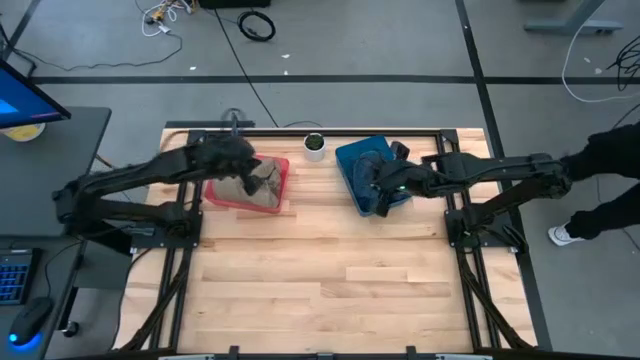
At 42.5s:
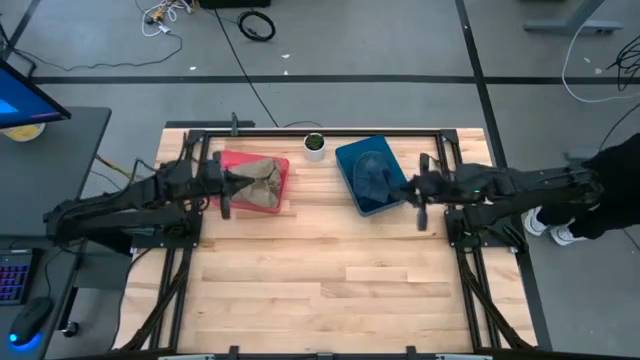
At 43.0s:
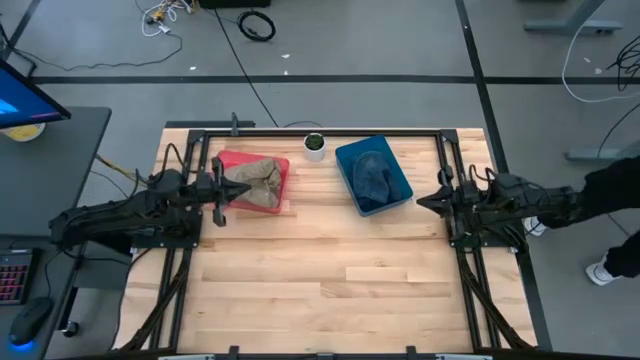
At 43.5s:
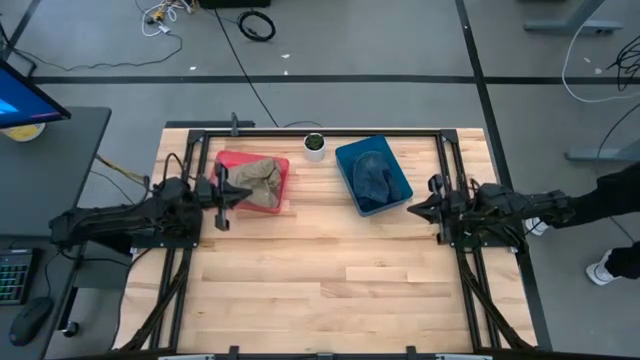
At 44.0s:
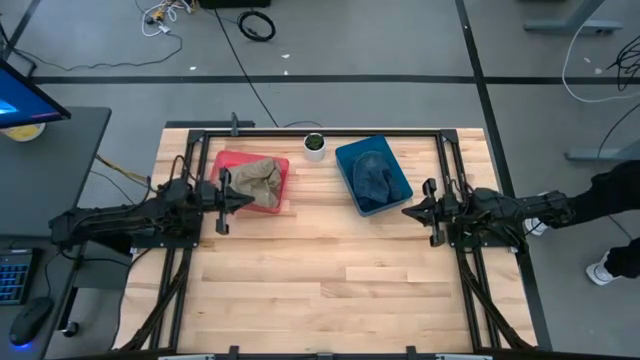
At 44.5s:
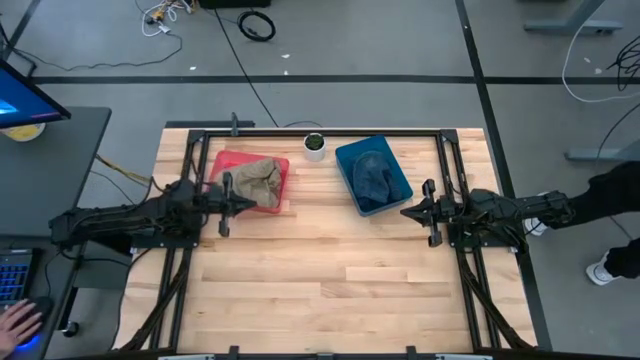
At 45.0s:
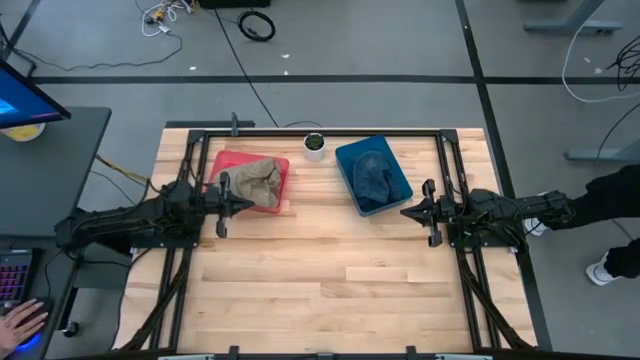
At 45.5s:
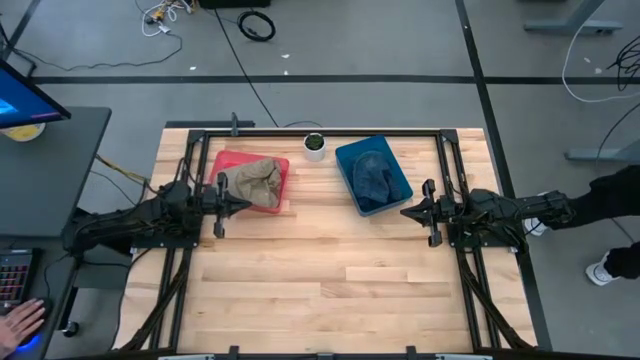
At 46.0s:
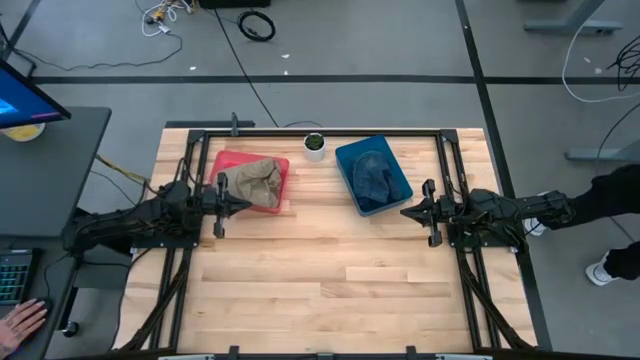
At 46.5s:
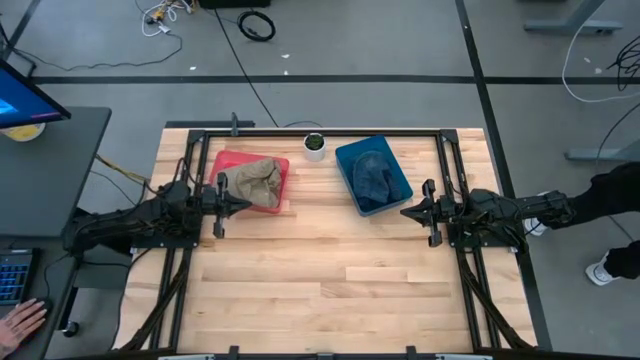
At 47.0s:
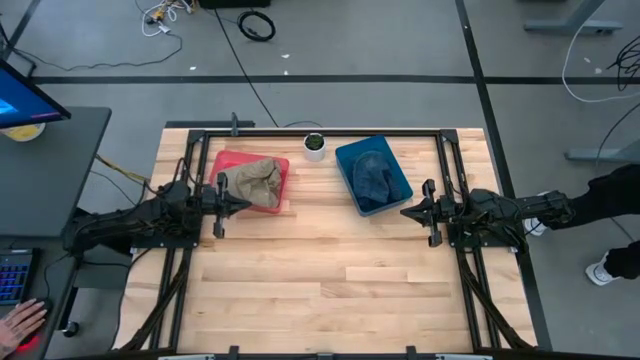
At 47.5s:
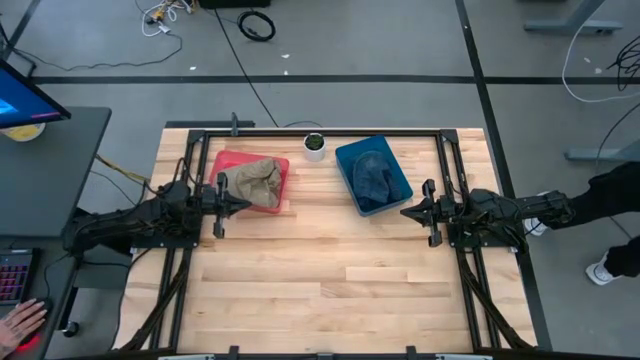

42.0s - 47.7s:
Task: Pick & Place hat
Return to Home Position

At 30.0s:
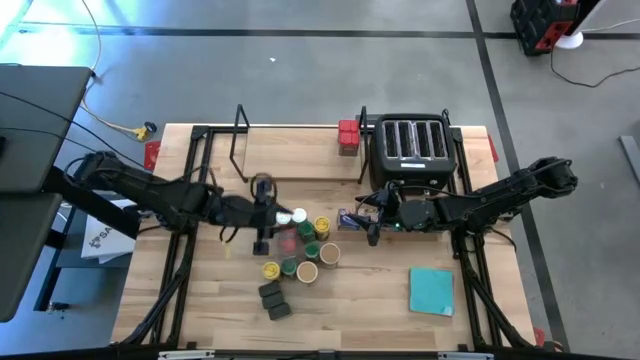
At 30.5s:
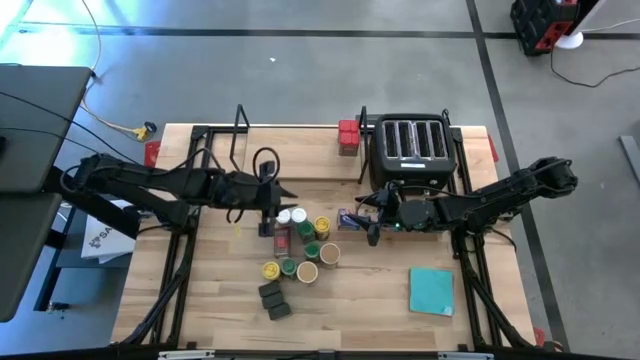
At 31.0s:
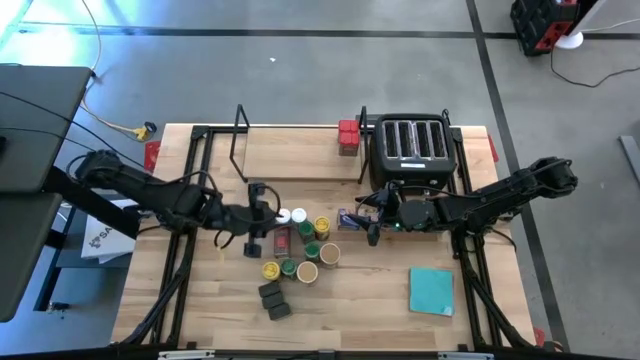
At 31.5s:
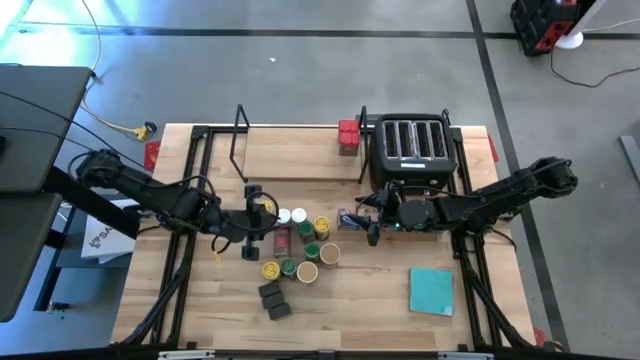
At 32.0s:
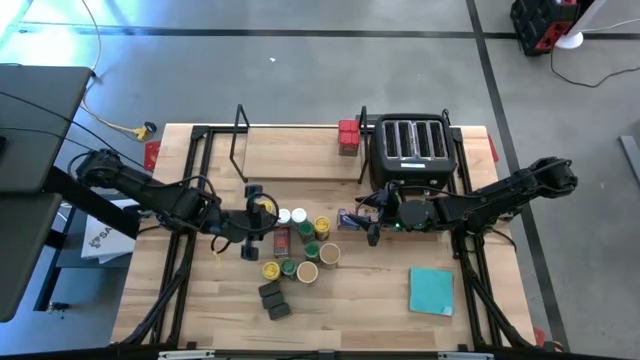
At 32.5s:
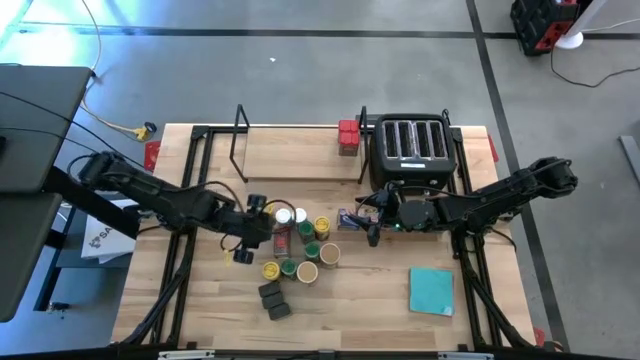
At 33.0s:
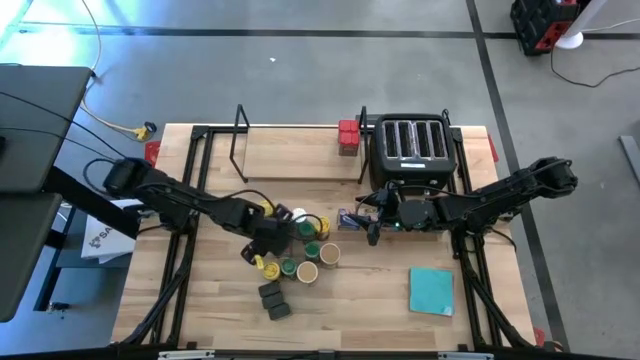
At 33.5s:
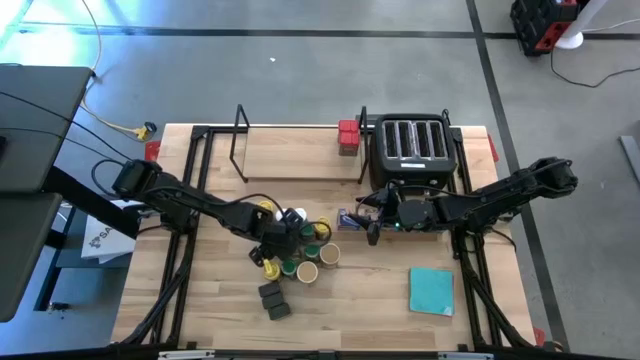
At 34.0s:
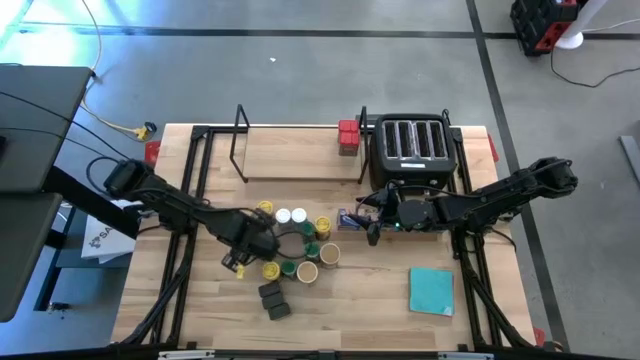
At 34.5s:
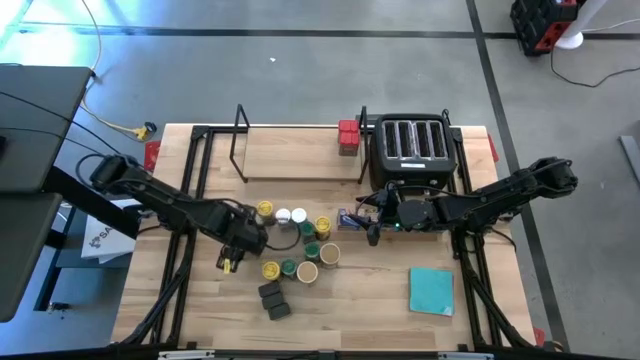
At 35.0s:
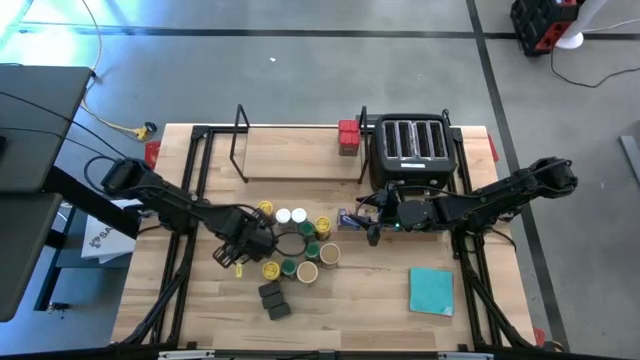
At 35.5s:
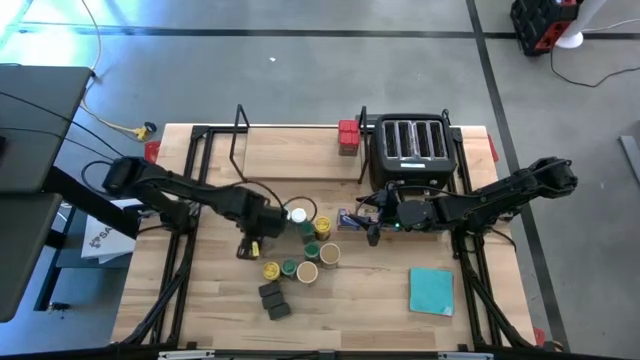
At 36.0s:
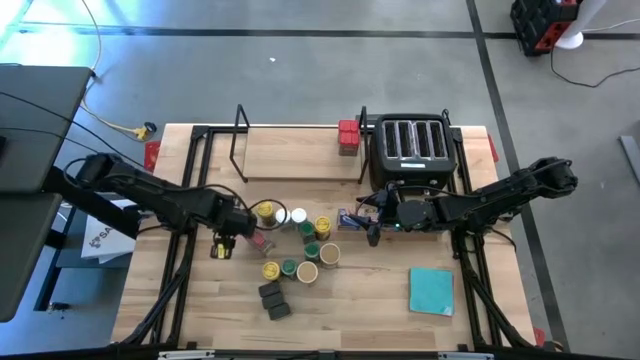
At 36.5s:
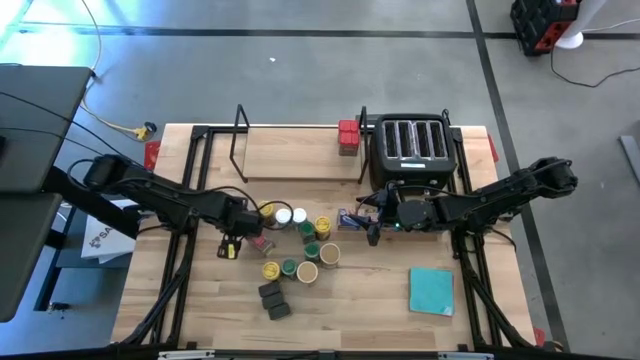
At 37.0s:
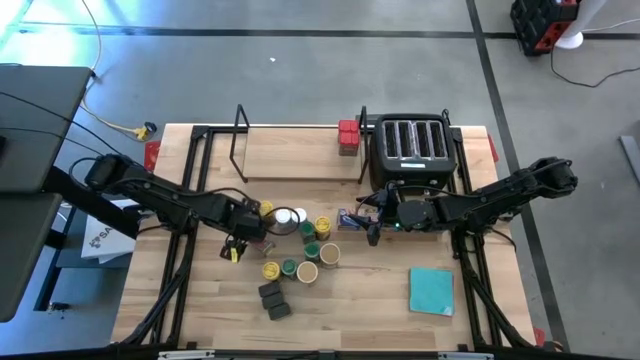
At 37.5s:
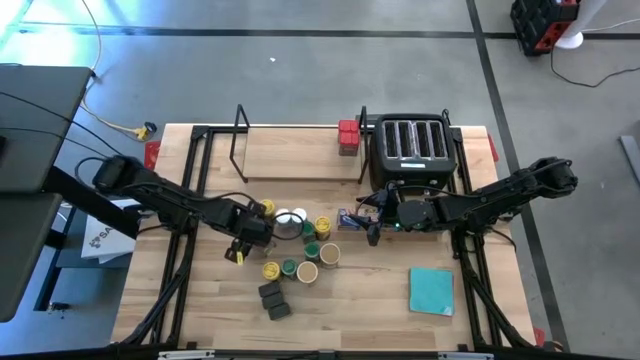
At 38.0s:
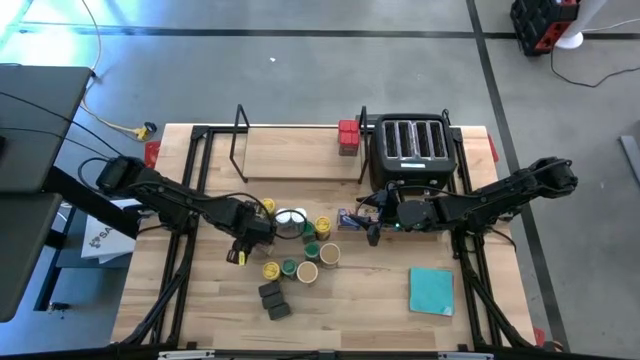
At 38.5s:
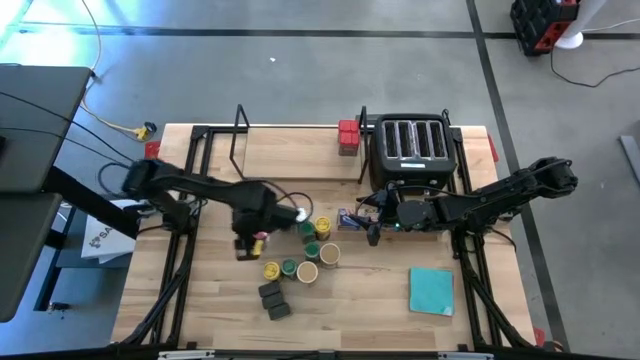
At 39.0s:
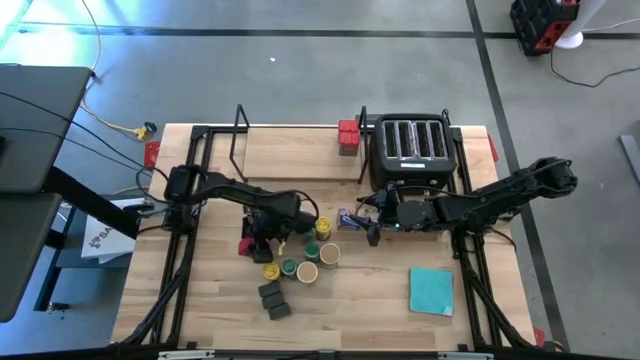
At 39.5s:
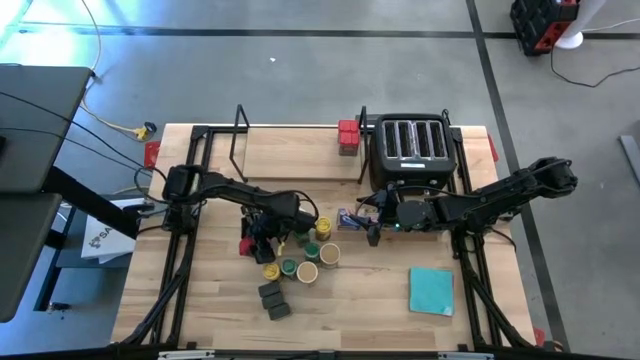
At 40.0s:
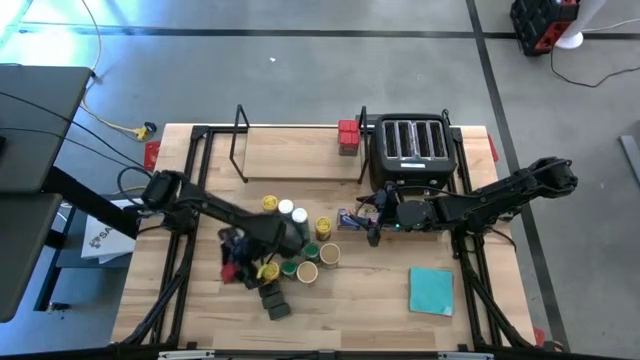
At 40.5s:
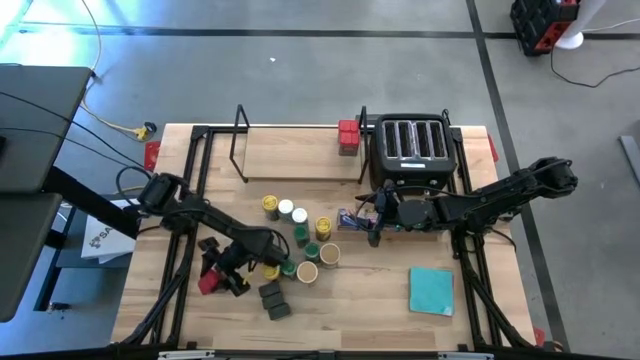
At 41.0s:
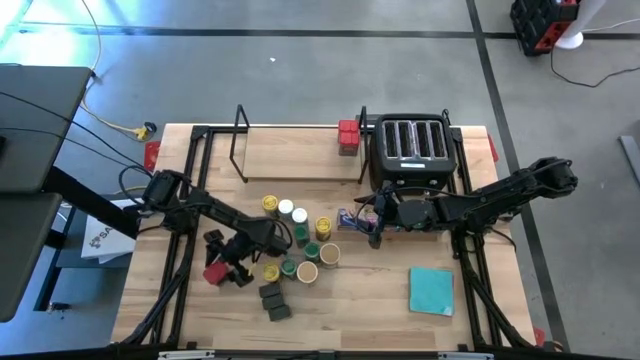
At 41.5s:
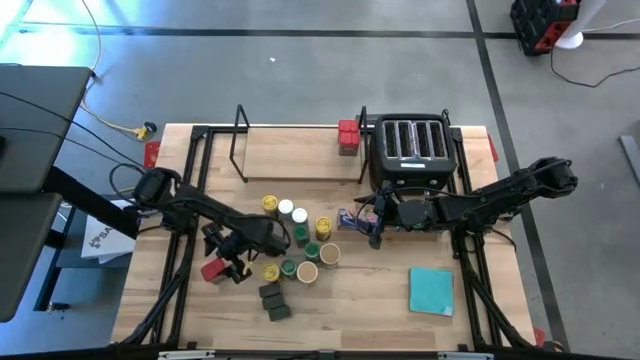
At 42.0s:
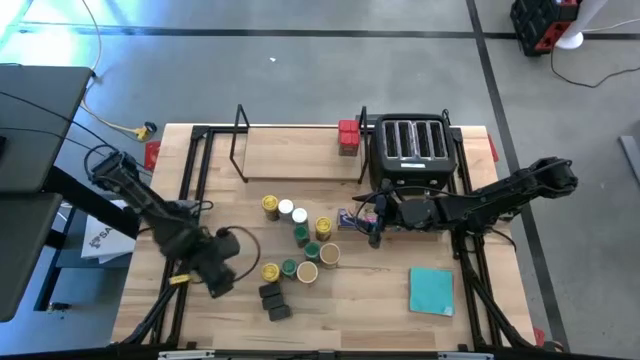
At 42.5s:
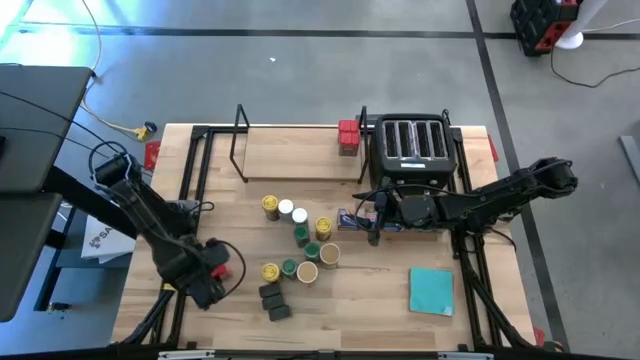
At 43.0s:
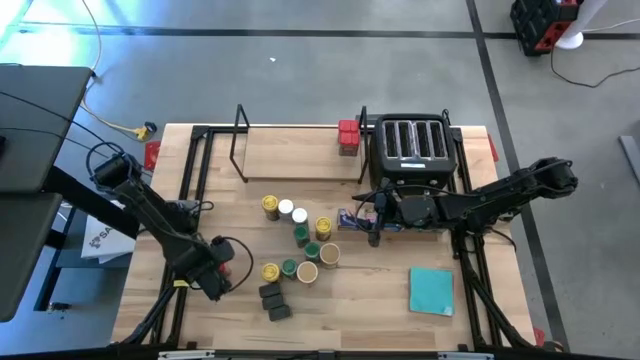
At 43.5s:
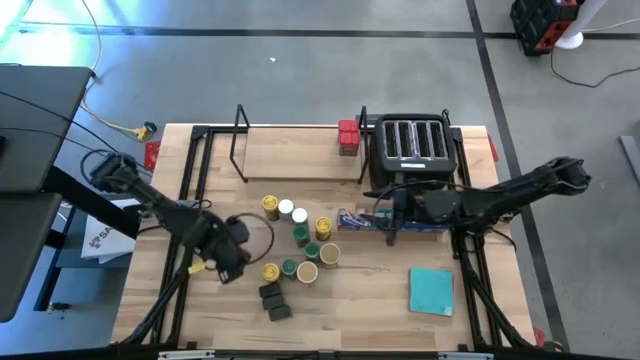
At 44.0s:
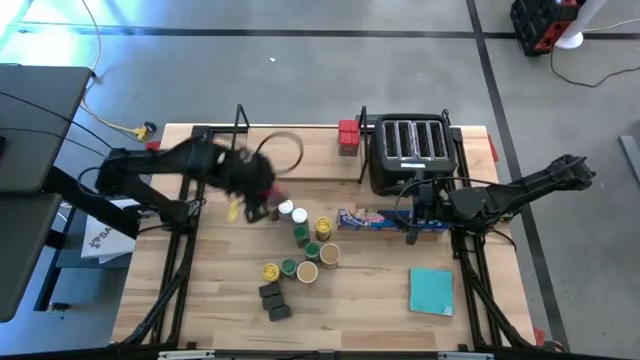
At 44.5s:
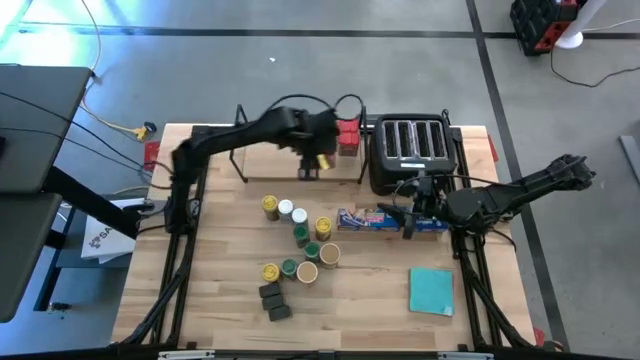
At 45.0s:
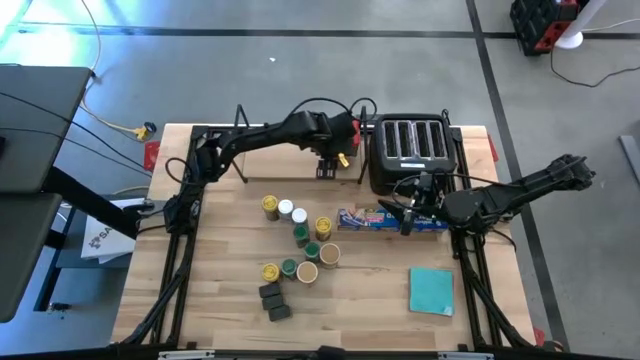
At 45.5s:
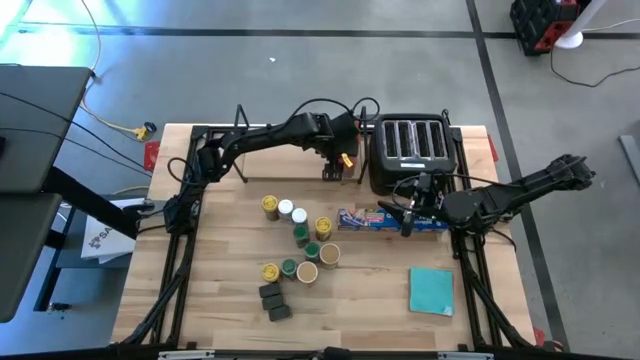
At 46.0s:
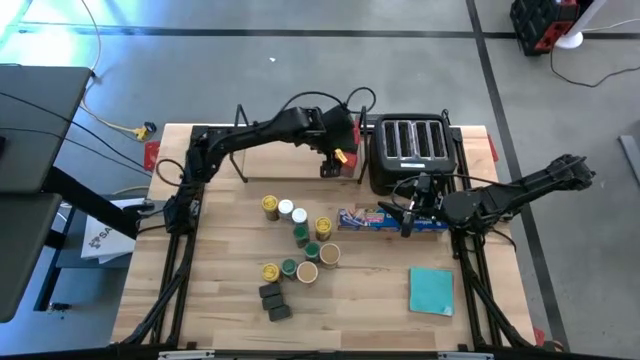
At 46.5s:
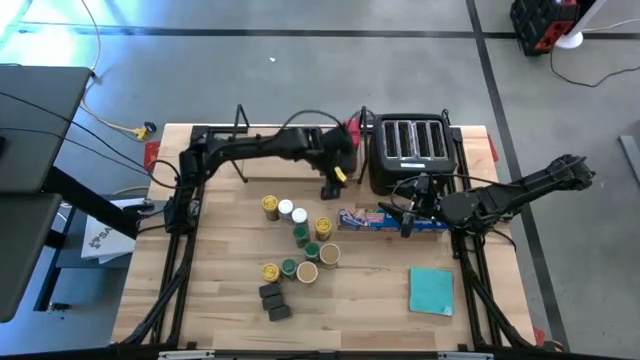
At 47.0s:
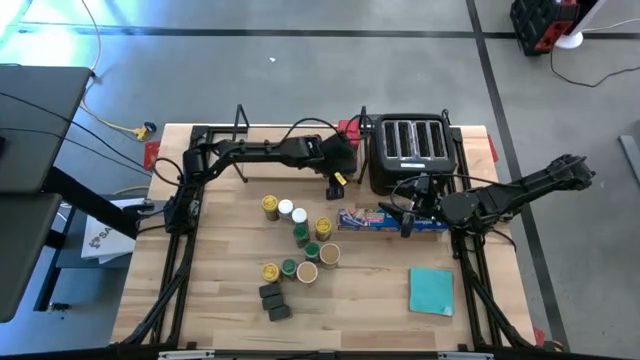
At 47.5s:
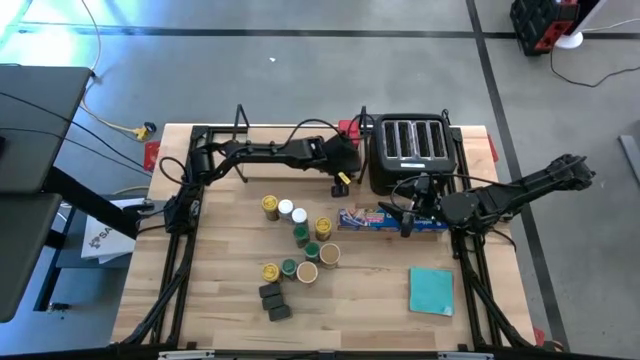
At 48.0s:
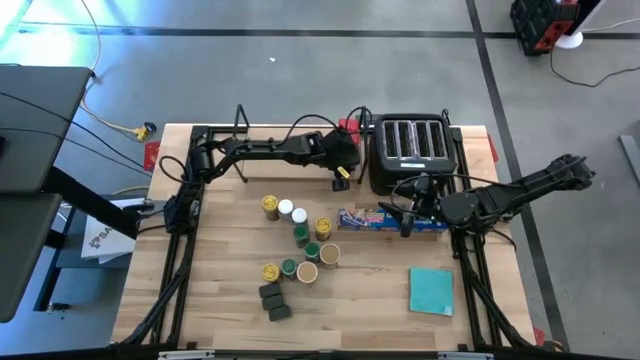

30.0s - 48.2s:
Task: Shelf spices
Put the red seasoning can on the shelf aligned with the other red seasoning cans
